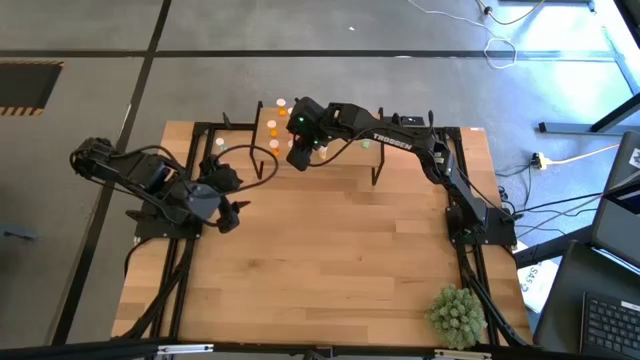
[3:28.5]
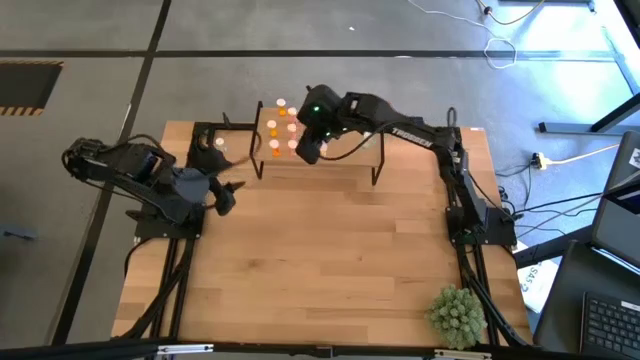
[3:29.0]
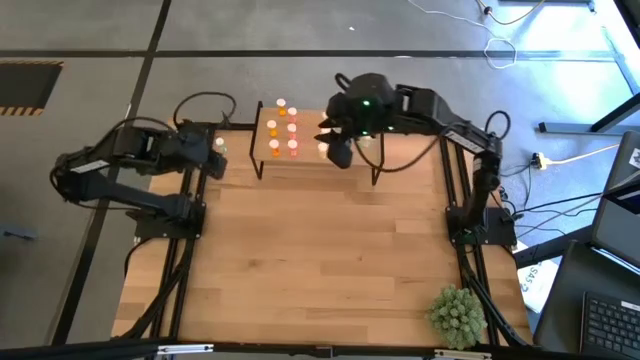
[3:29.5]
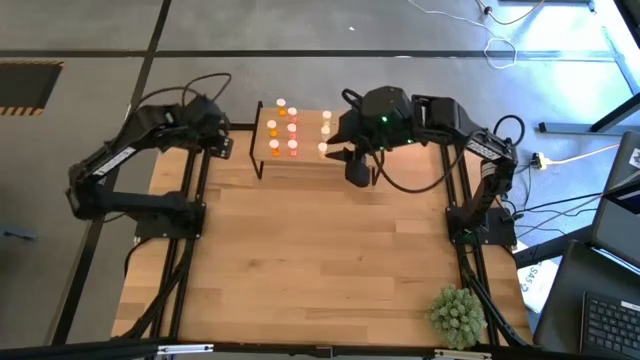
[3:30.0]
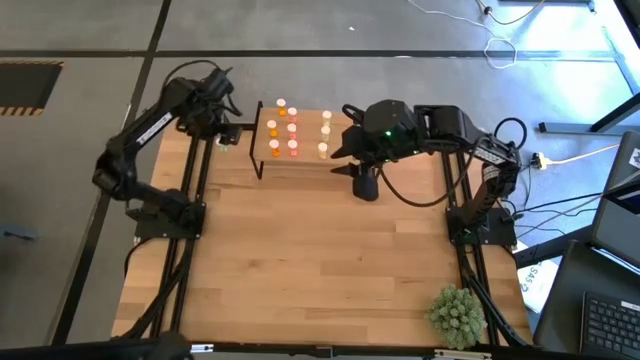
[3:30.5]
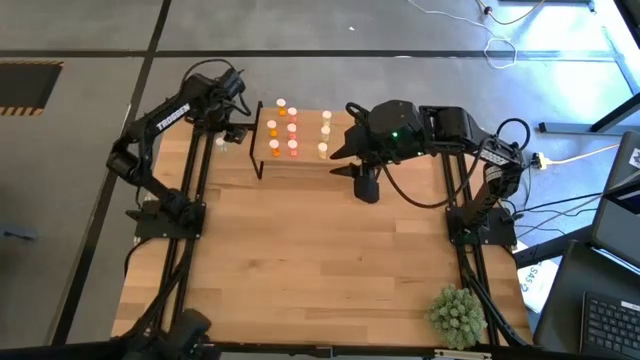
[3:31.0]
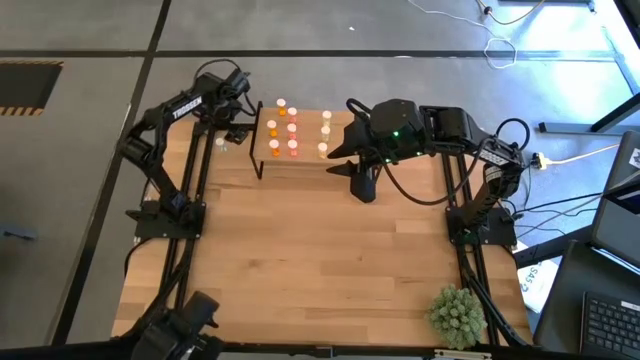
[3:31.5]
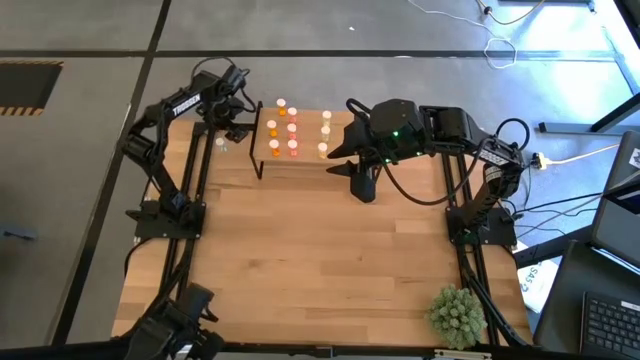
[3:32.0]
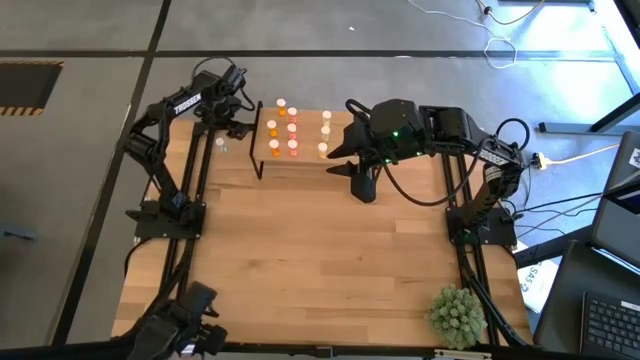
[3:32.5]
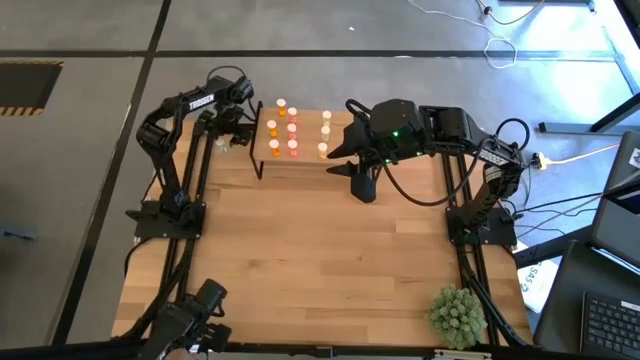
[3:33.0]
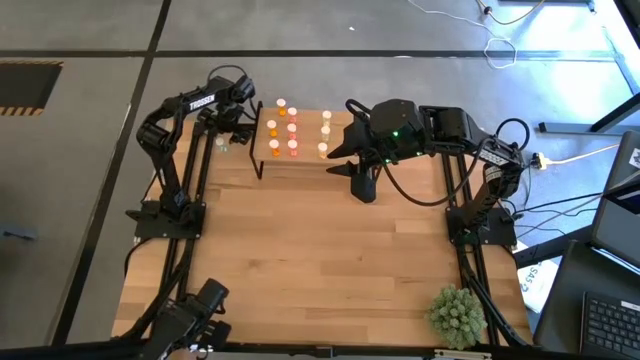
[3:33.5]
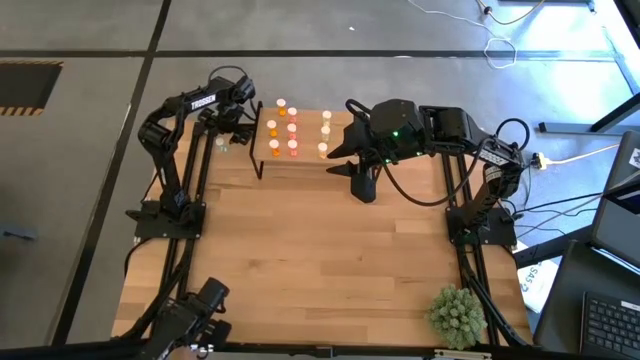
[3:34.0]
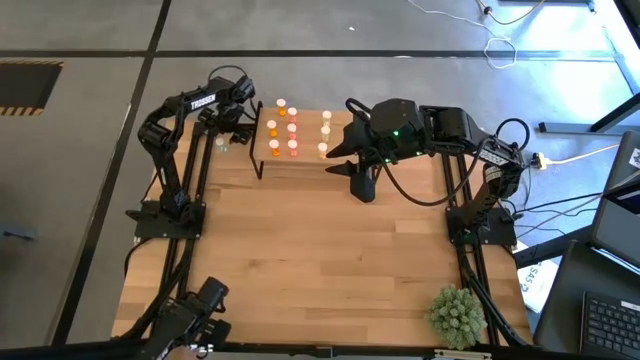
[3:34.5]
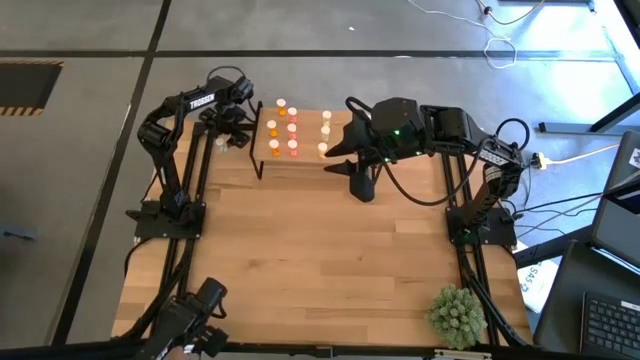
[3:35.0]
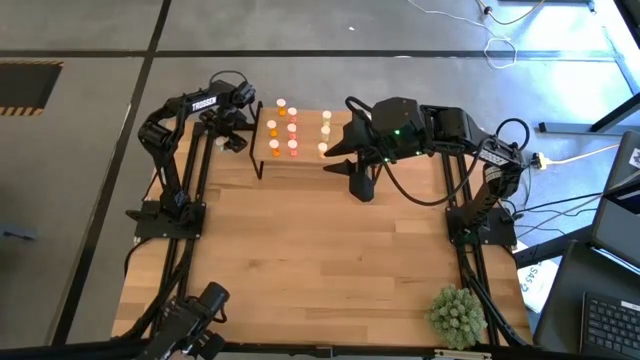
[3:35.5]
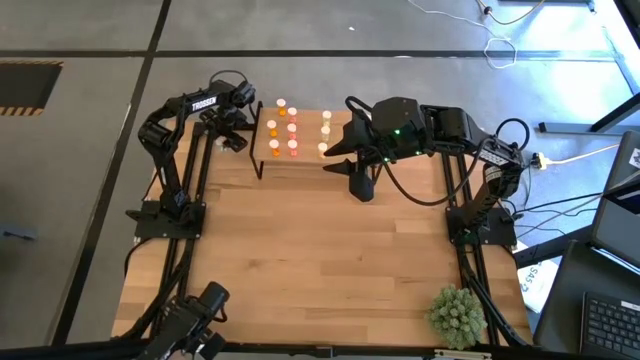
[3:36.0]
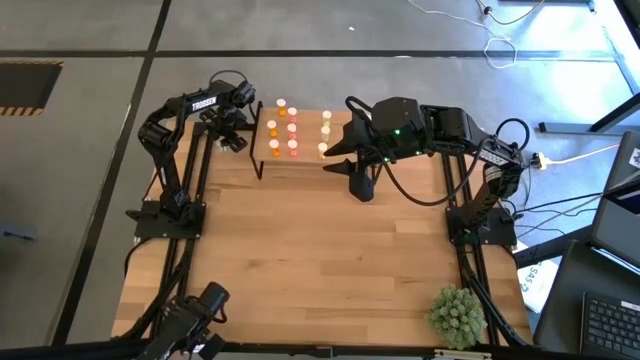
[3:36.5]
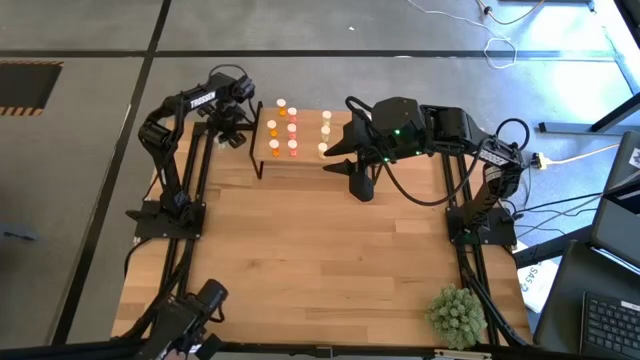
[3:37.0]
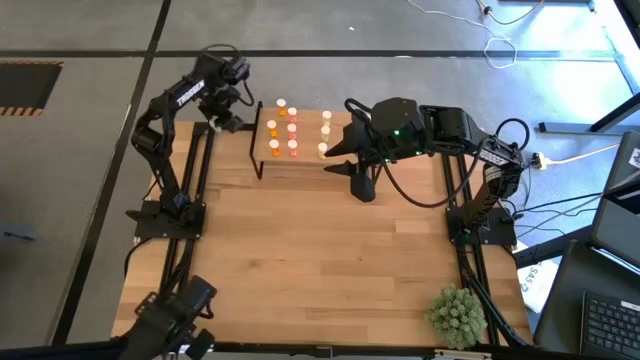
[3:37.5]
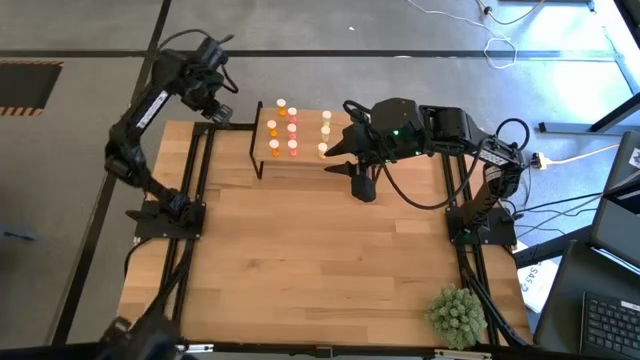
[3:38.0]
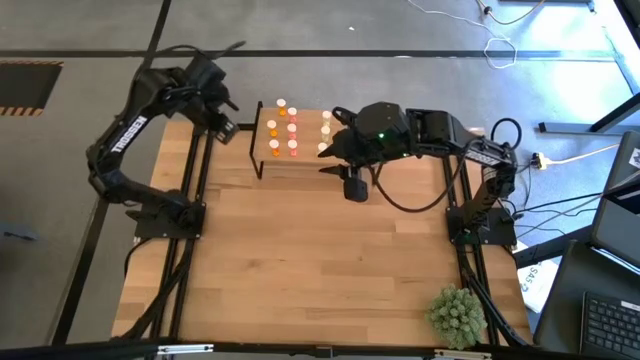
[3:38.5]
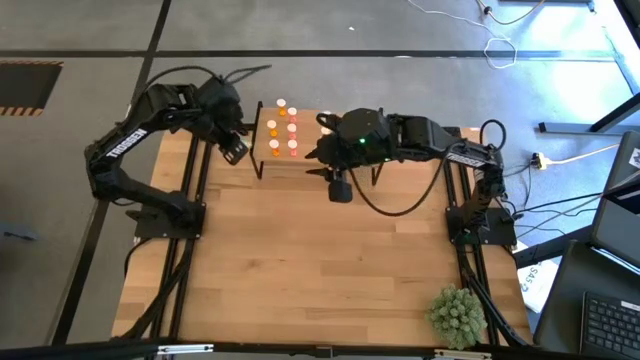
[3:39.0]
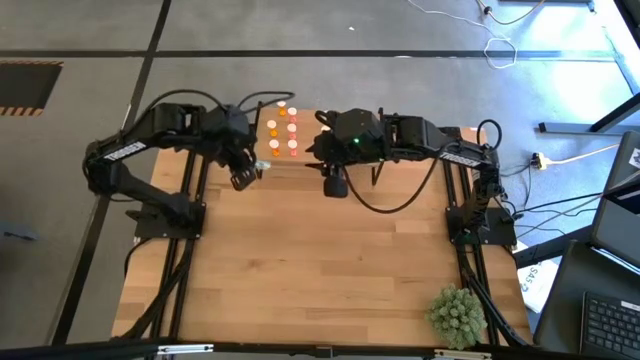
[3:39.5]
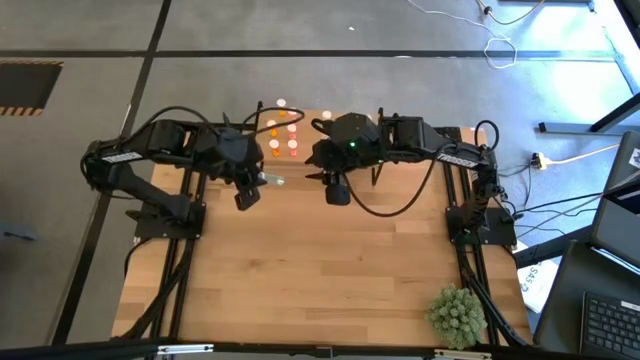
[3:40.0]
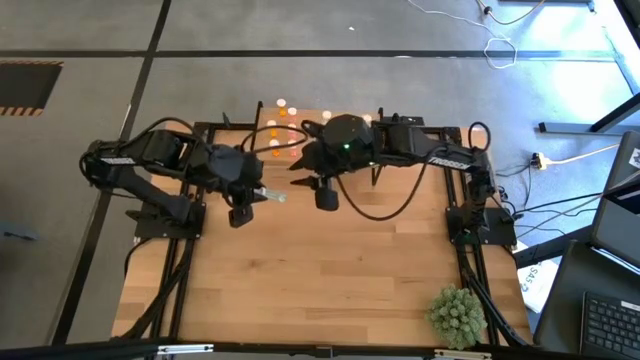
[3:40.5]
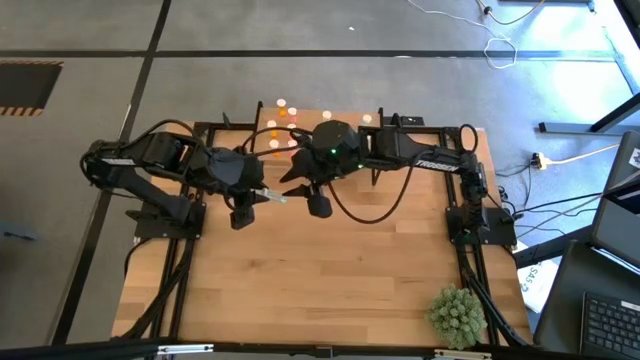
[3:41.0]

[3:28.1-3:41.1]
Task: Pick and place medicine bottles onto shelf by color
Put the blue pill bottle on the shelf aligned with the other blue pill bottles

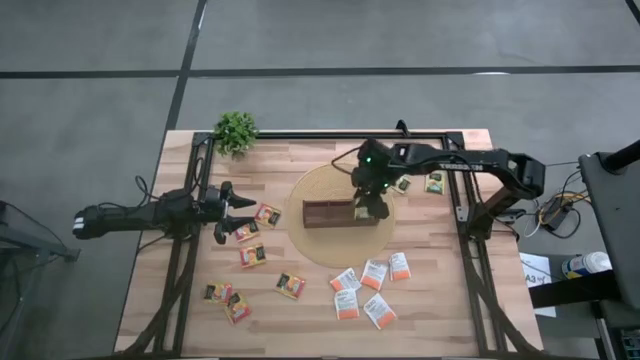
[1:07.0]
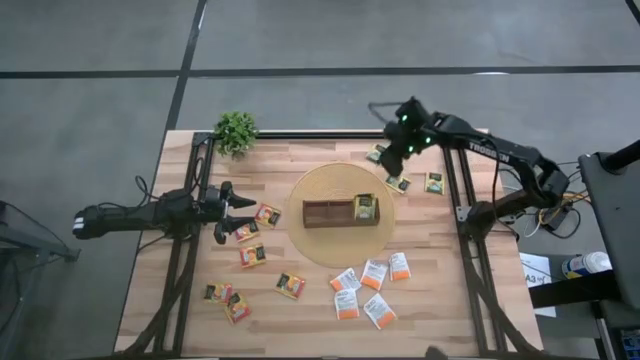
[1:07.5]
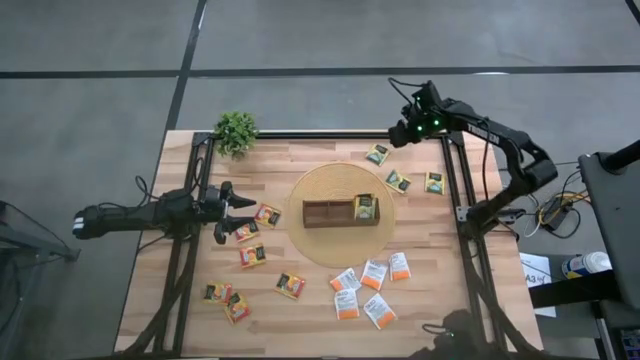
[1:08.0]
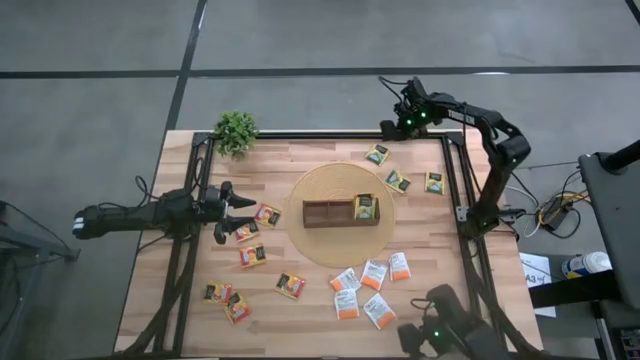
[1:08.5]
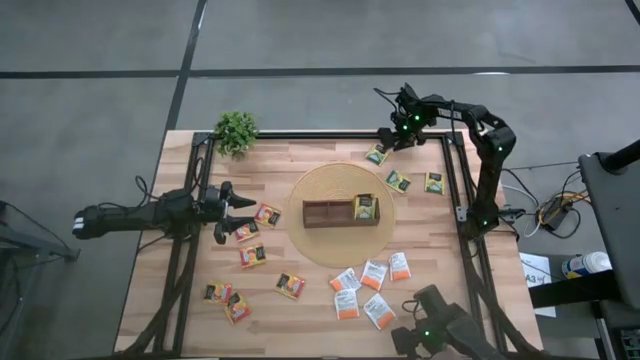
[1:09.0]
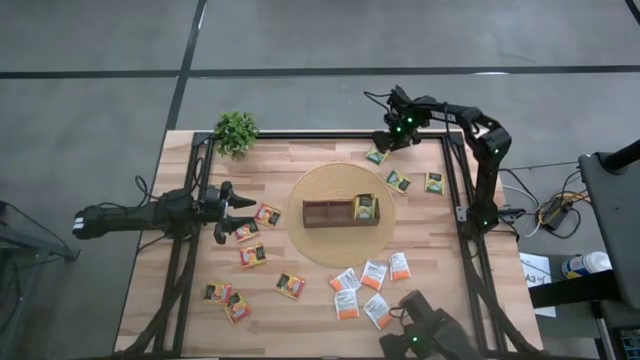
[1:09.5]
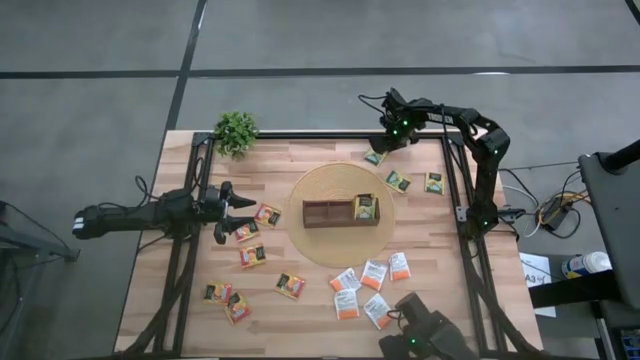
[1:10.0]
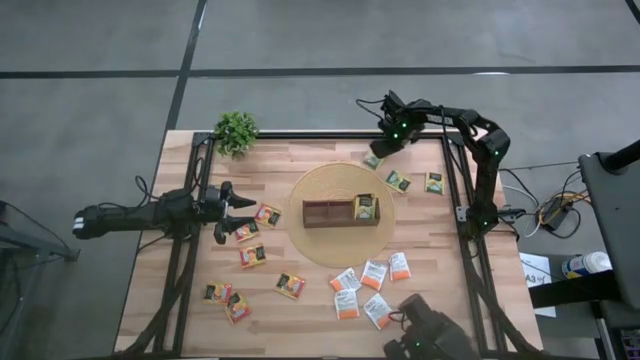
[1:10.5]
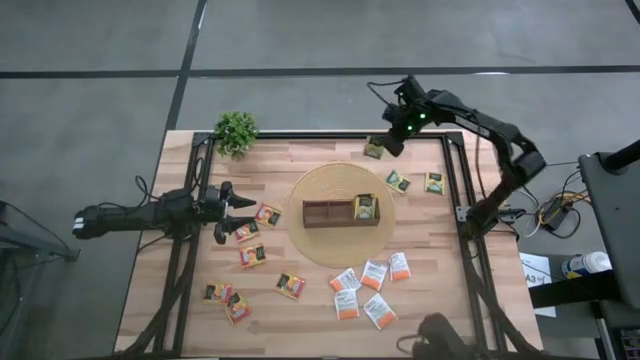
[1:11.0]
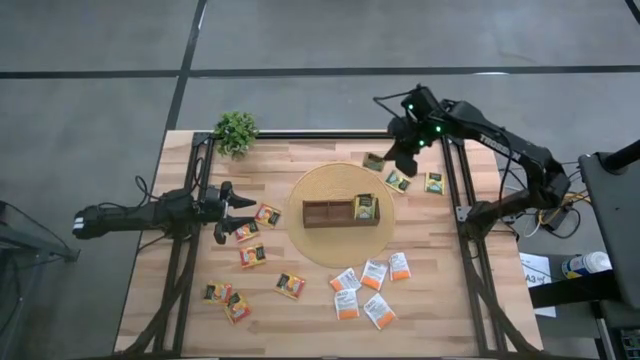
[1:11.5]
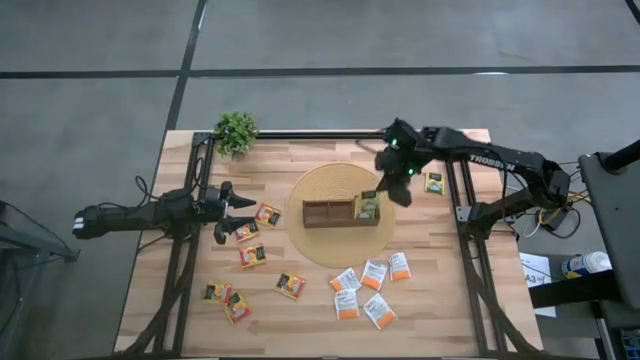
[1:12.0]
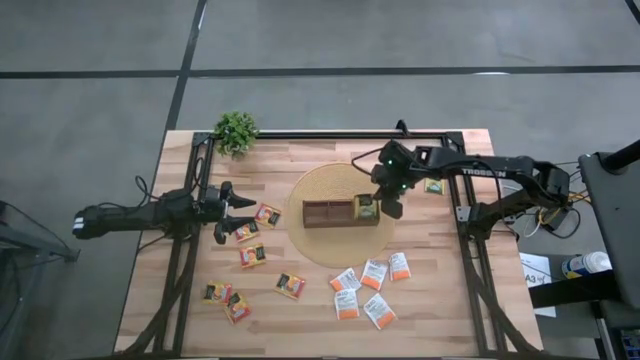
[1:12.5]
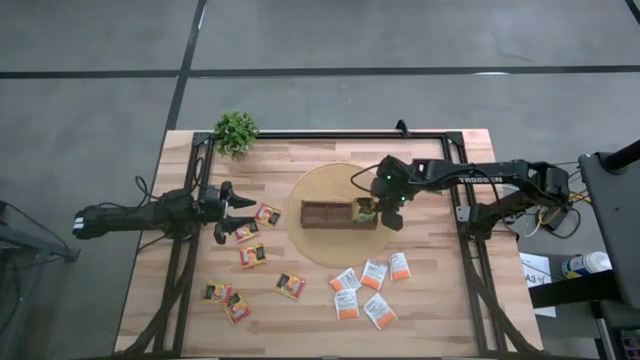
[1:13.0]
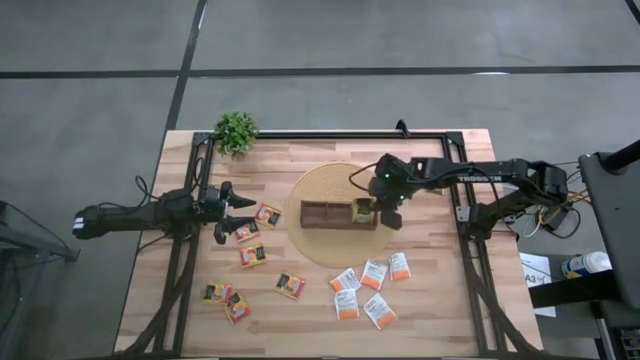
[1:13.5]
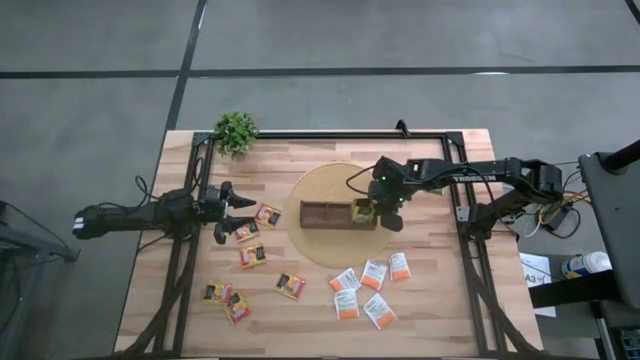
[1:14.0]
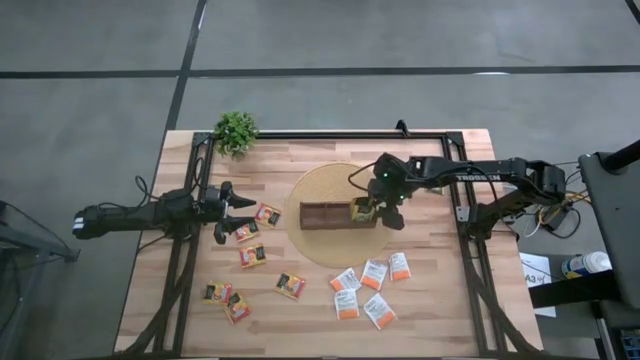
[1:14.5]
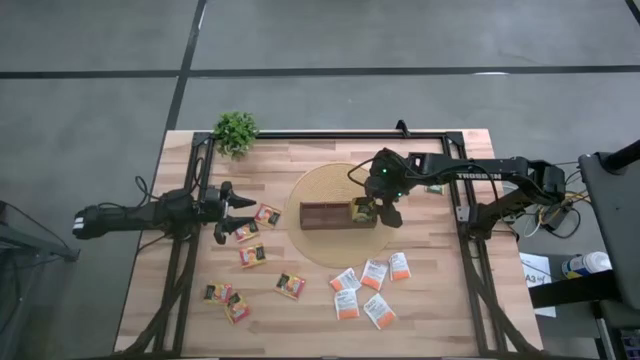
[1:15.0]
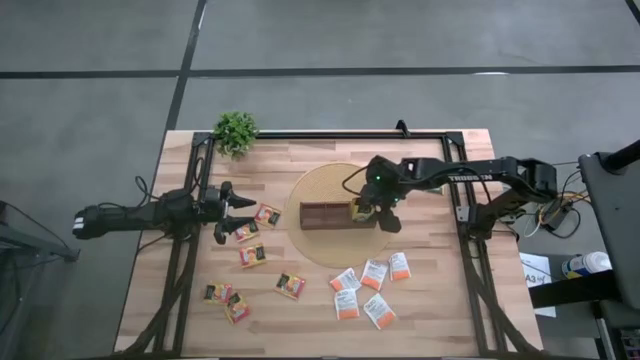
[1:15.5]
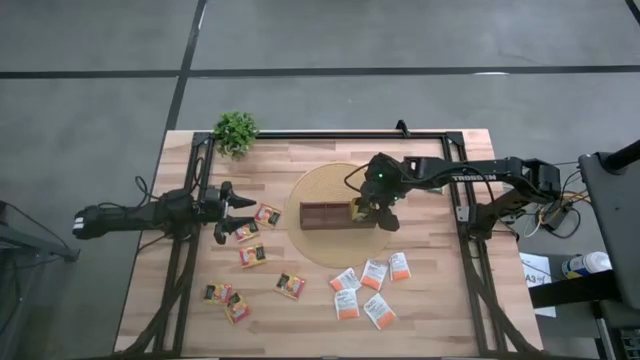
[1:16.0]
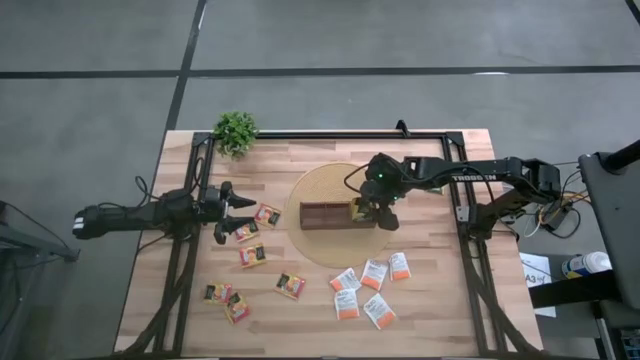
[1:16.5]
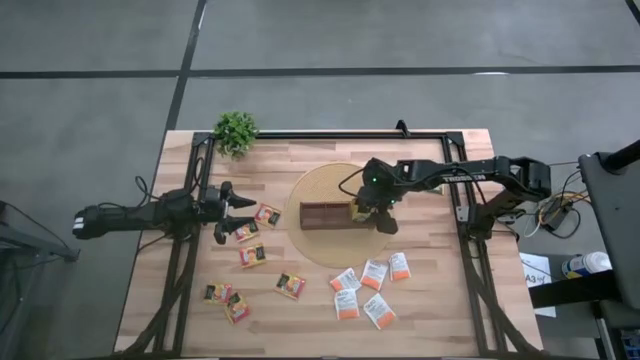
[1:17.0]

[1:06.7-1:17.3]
Task: Pick & Place Tea
Put the yellow tea bag into the right section of the wooden organizer
